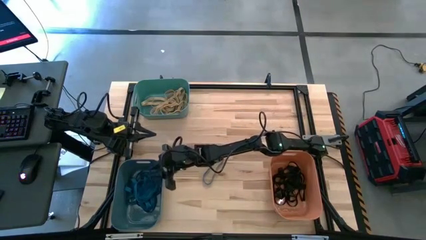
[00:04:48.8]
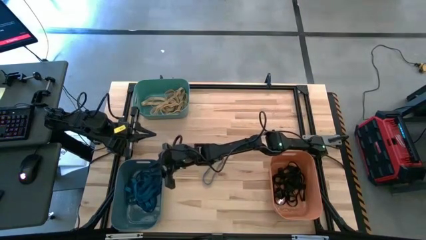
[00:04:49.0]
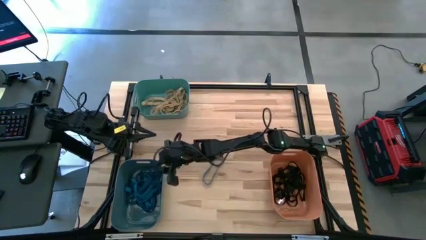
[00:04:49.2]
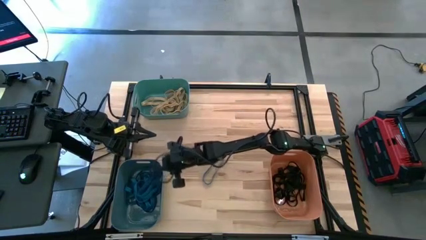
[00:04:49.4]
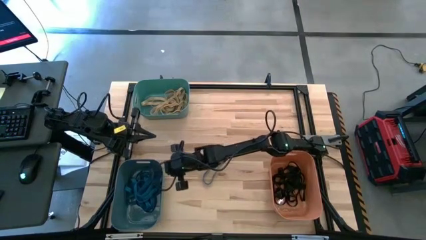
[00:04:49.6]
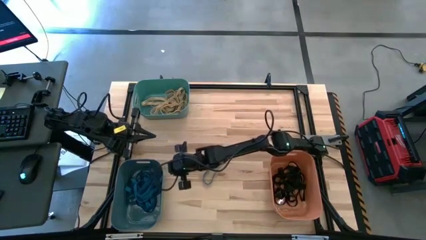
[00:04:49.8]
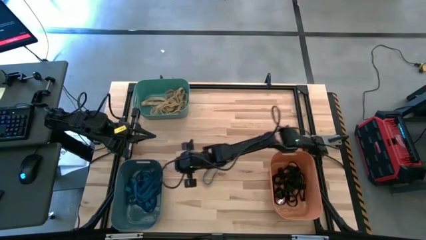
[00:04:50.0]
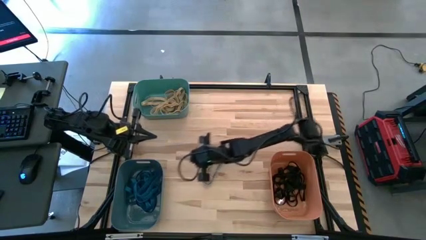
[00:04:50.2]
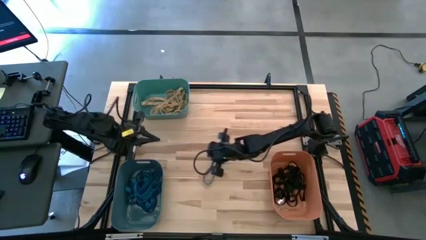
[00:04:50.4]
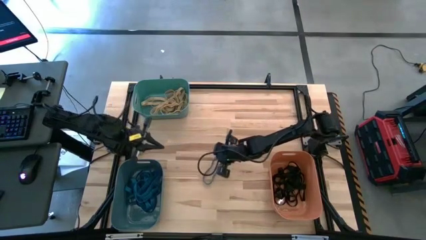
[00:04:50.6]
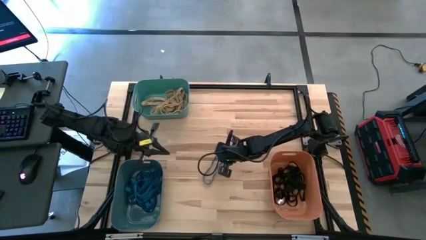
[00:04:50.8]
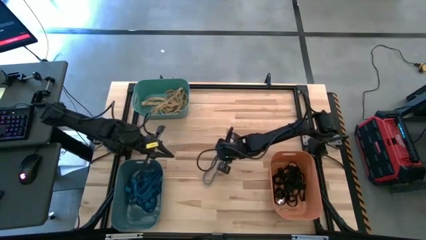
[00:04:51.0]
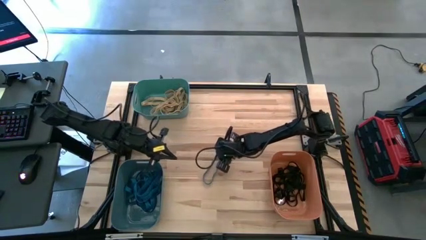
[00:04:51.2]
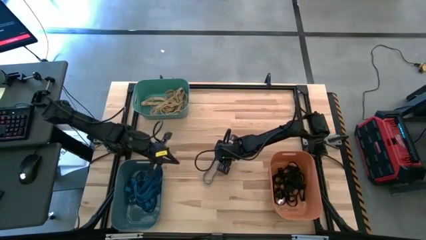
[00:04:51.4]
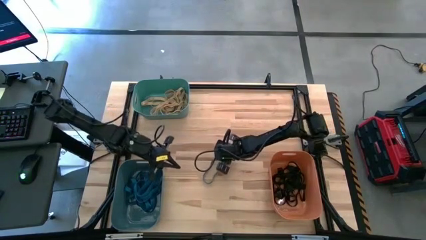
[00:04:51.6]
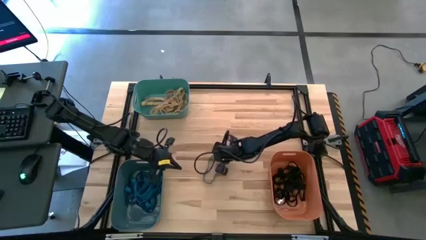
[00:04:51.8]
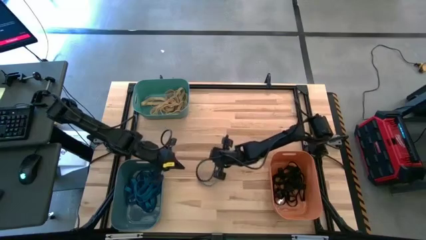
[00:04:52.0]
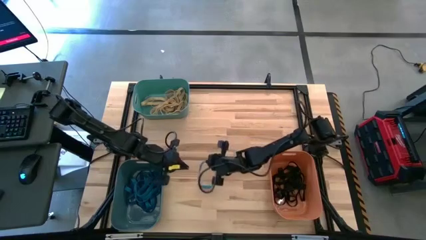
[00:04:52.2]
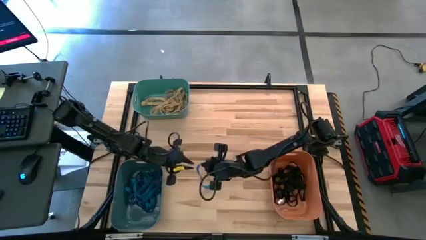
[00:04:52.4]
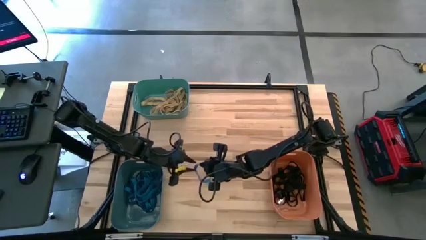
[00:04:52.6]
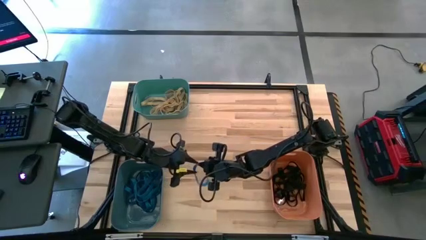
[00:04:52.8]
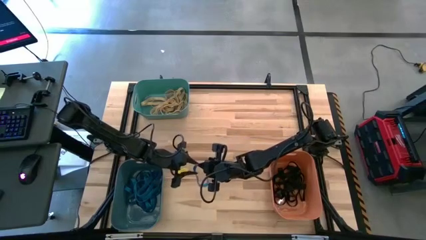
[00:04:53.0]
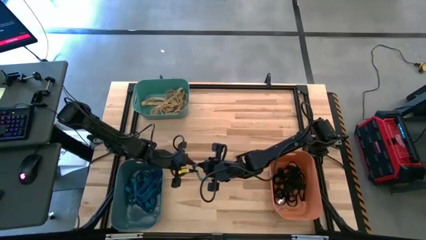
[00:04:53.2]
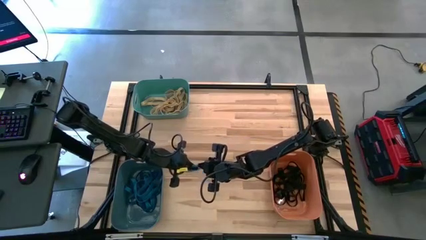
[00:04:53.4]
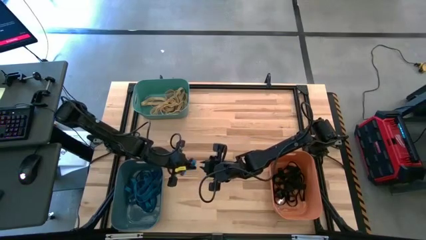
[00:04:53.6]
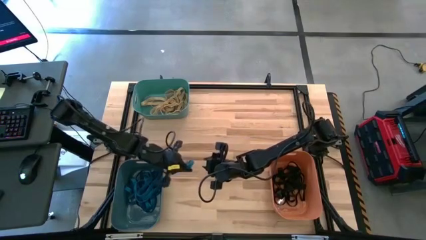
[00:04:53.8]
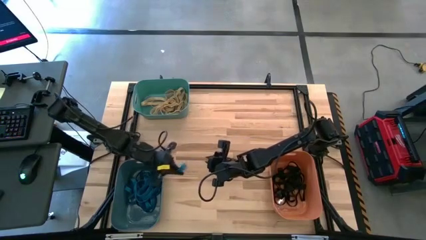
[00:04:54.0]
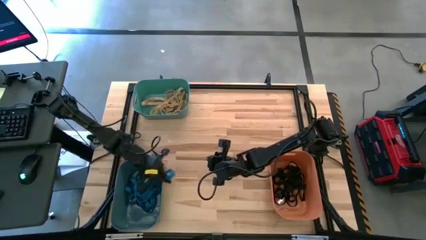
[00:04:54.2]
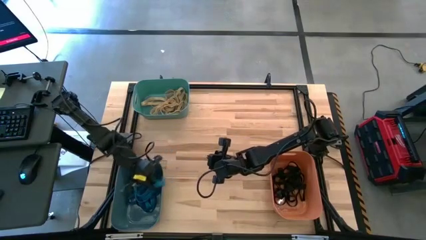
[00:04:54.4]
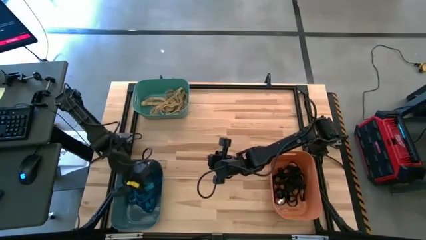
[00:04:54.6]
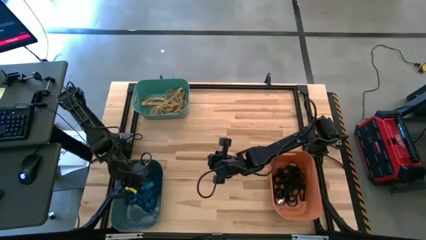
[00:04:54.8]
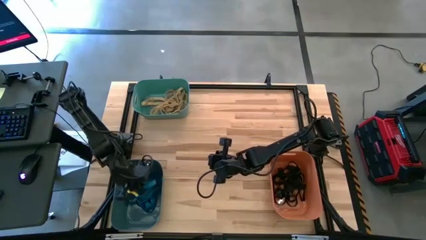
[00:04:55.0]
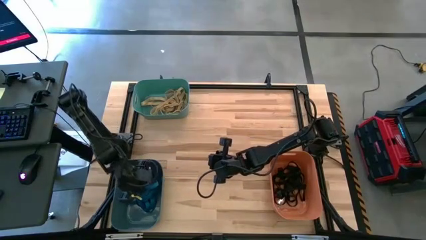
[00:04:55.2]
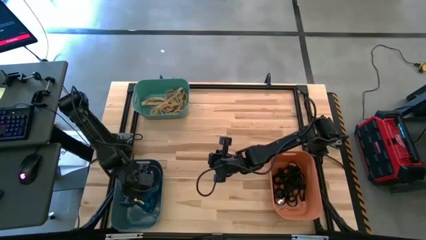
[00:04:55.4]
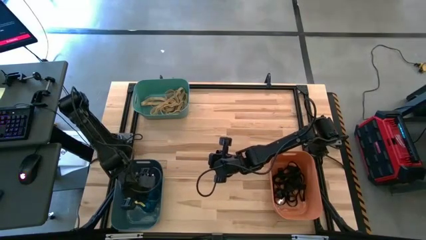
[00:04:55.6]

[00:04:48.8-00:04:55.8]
Task: Sort rubber bands into baskets
Put the blue rubber band into the blue bin

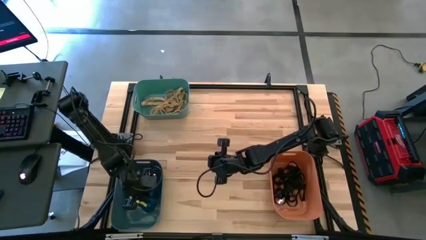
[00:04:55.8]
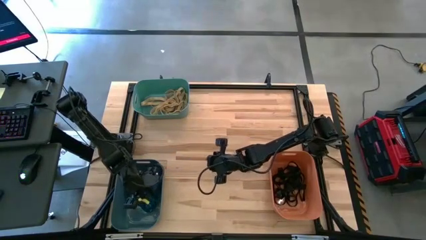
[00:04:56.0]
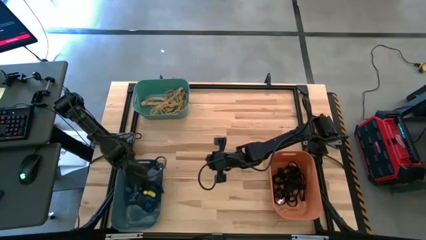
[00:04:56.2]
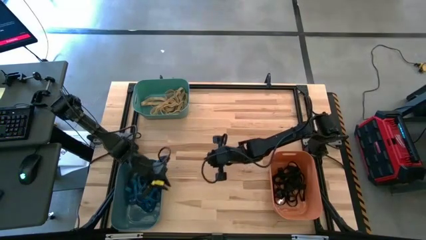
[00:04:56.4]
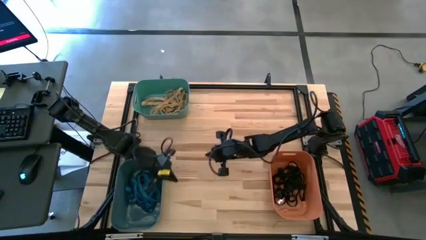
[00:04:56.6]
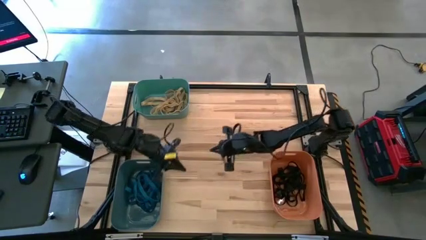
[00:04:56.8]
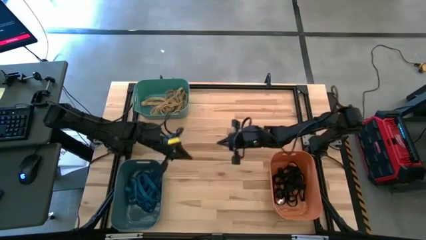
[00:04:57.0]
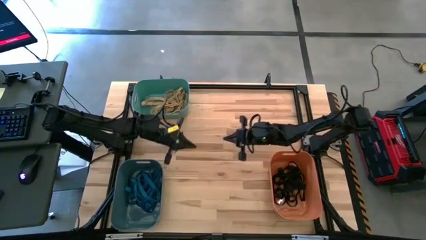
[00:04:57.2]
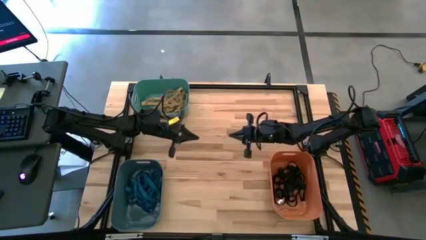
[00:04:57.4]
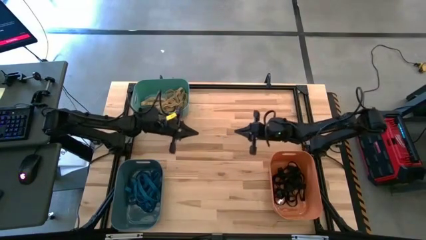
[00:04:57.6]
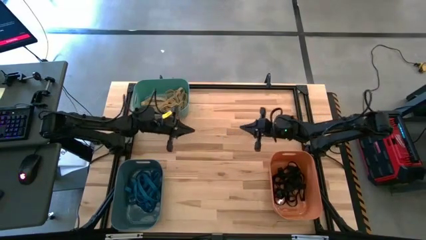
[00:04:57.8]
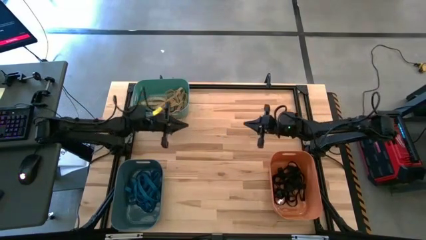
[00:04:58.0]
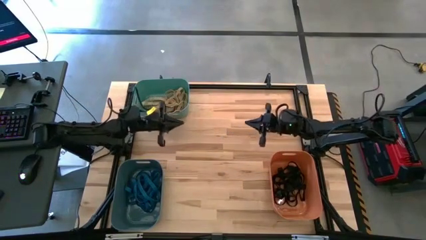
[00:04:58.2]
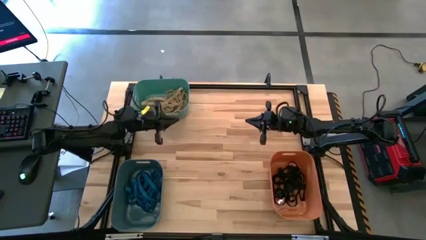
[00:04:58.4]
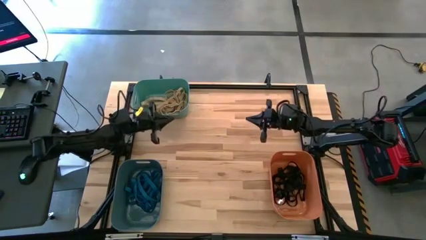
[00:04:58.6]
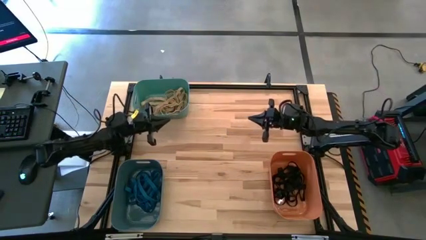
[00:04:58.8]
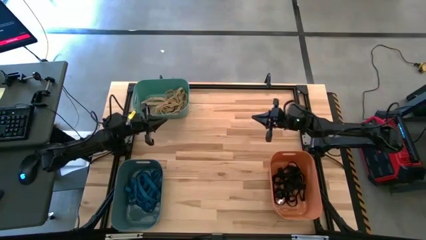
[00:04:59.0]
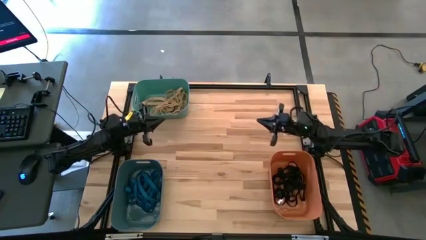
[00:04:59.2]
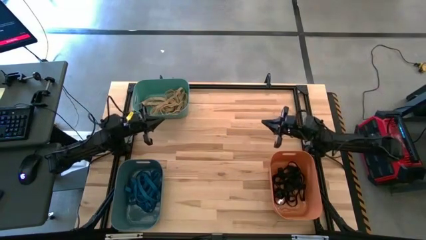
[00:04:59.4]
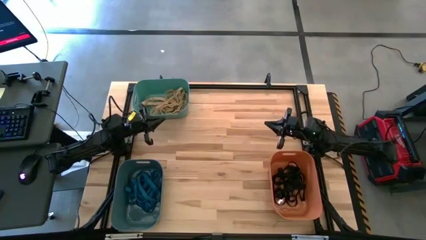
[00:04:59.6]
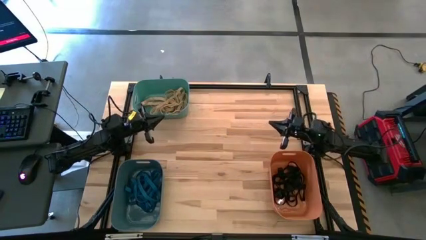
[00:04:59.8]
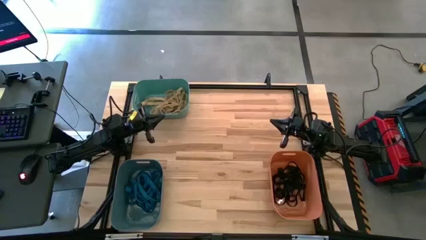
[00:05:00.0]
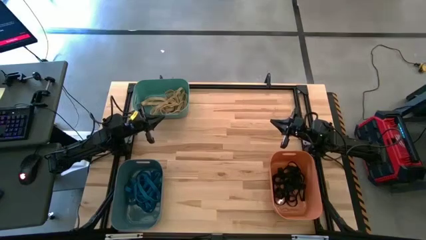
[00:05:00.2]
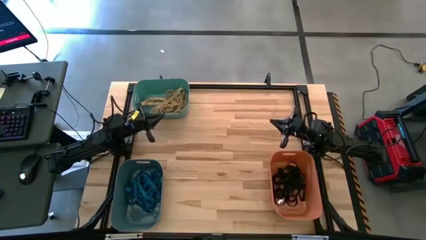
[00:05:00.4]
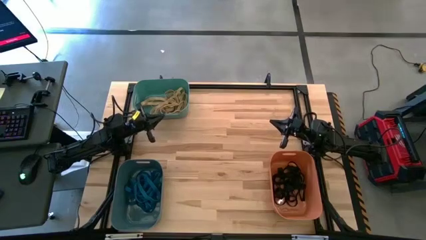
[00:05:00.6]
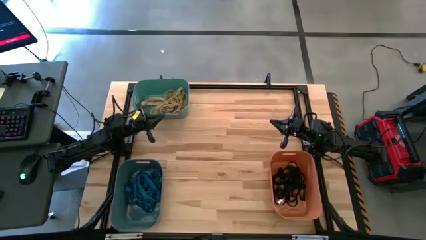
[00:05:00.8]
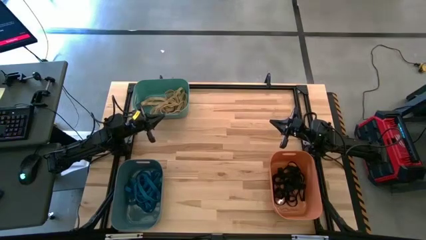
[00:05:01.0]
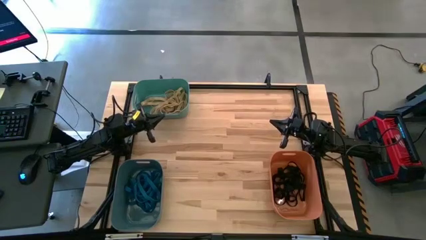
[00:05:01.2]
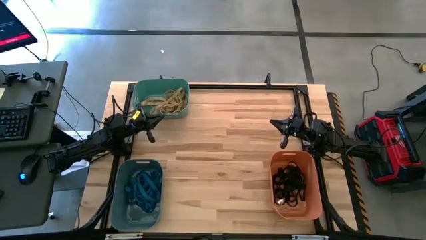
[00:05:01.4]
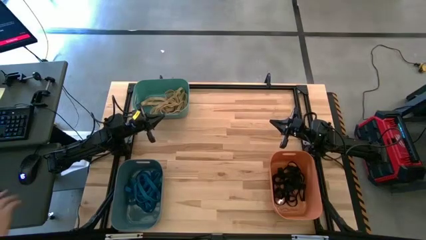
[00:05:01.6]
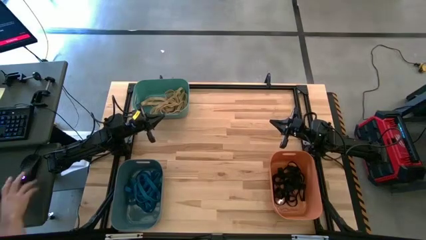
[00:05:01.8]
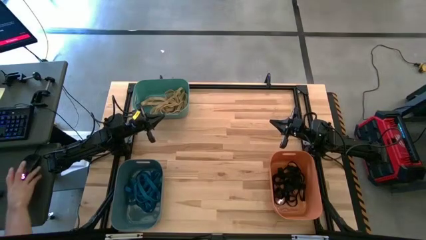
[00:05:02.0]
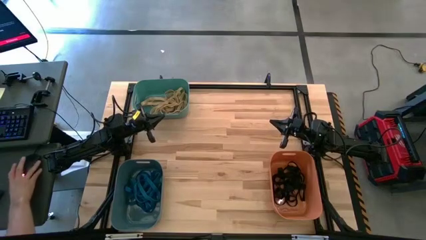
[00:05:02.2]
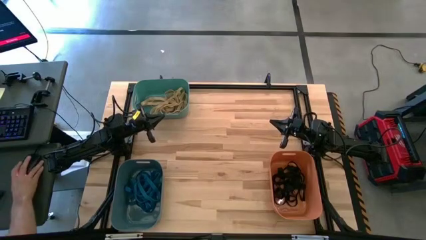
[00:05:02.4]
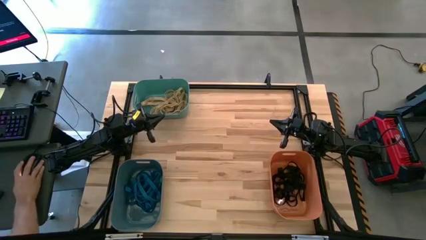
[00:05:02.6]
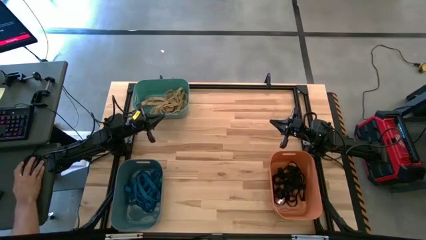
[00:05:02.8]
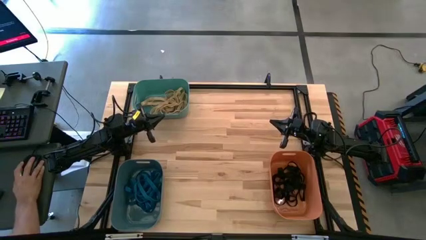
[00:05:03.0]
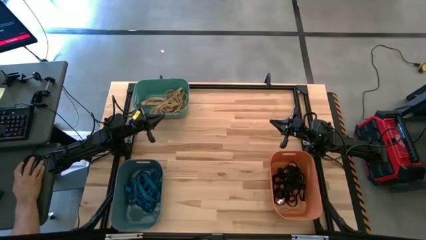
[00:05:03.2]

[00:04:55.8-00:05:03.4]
Return to Home Position
